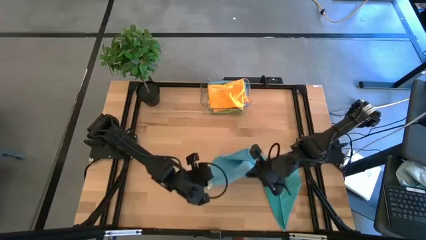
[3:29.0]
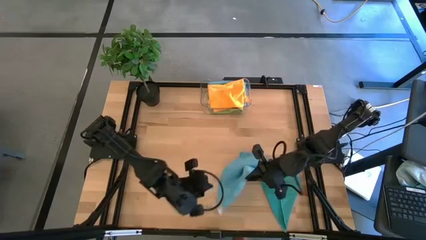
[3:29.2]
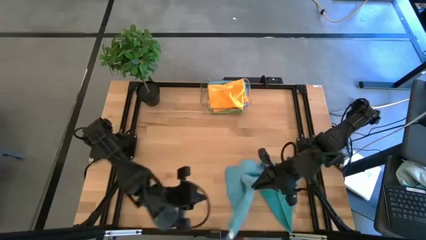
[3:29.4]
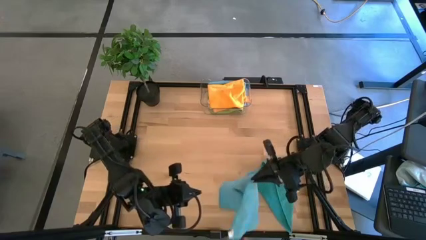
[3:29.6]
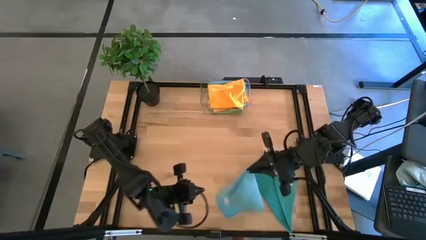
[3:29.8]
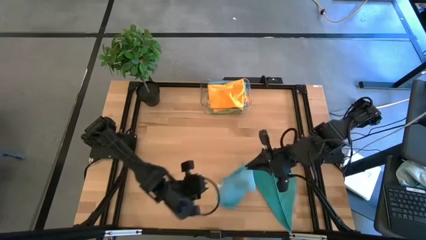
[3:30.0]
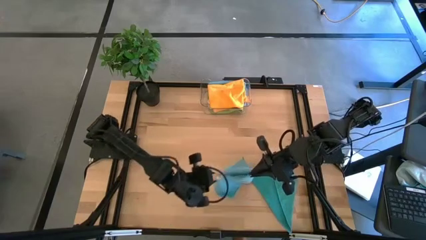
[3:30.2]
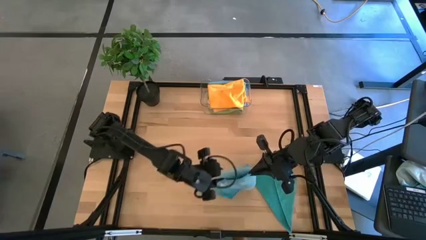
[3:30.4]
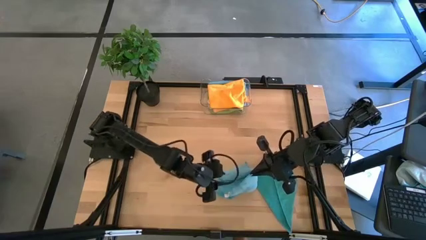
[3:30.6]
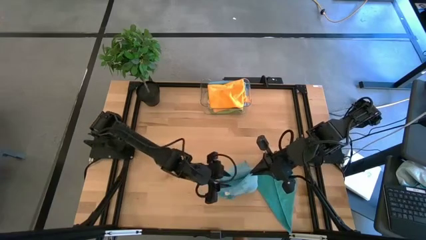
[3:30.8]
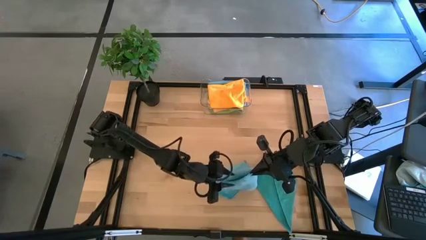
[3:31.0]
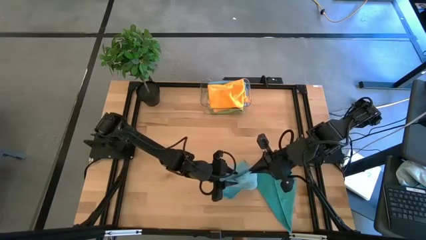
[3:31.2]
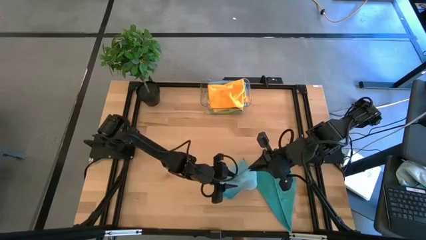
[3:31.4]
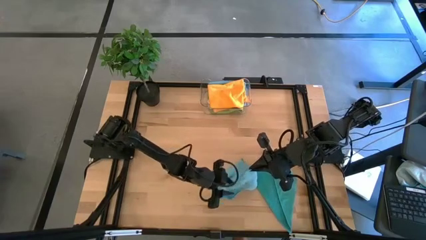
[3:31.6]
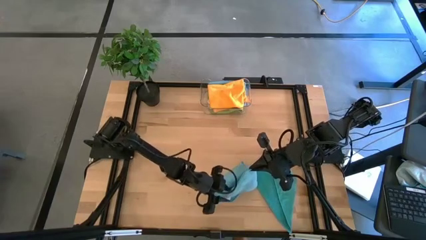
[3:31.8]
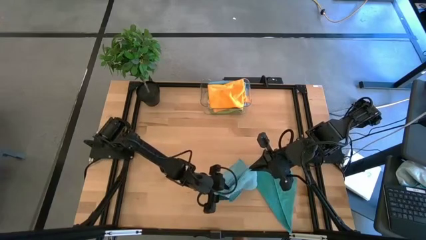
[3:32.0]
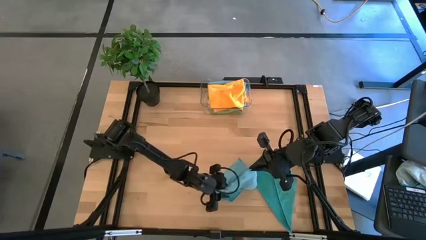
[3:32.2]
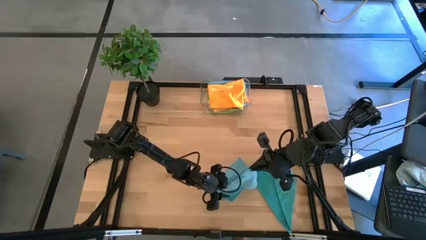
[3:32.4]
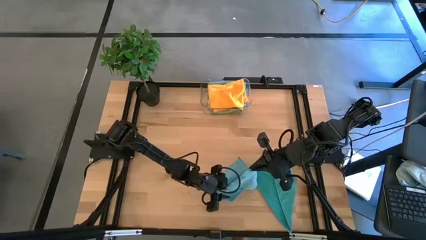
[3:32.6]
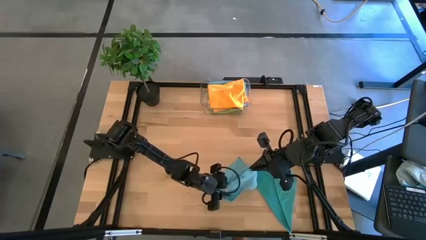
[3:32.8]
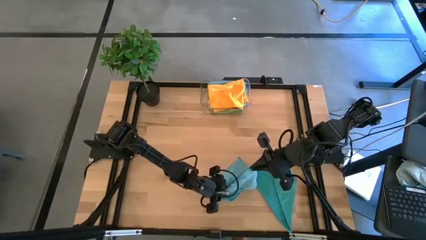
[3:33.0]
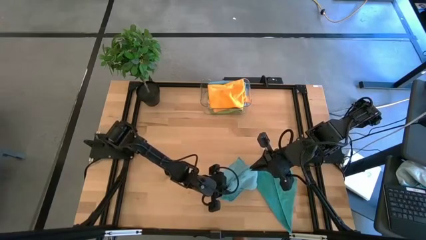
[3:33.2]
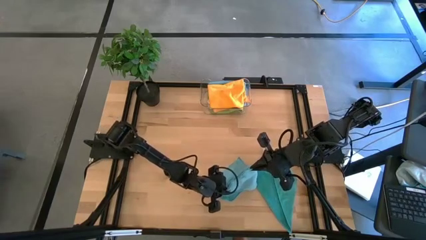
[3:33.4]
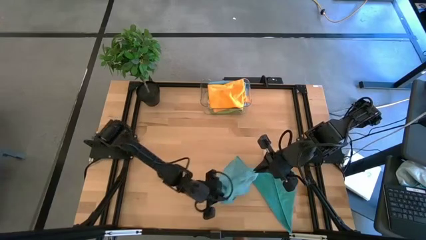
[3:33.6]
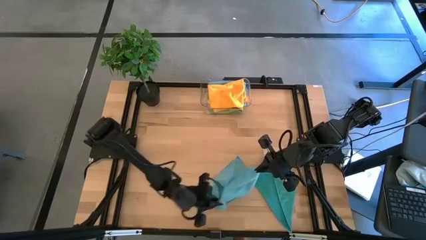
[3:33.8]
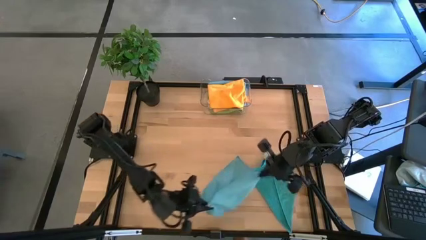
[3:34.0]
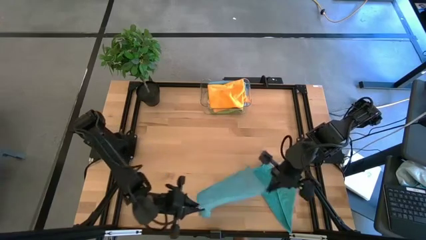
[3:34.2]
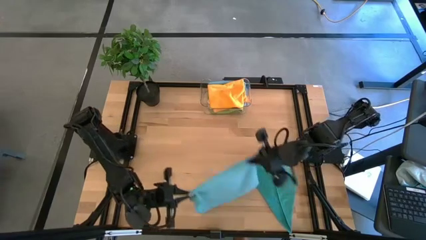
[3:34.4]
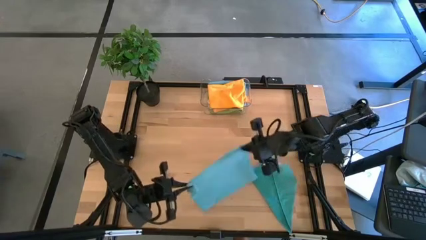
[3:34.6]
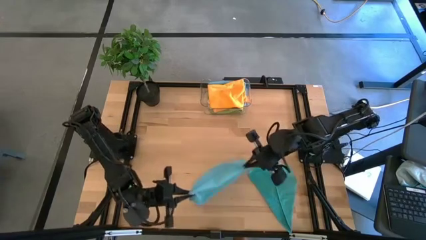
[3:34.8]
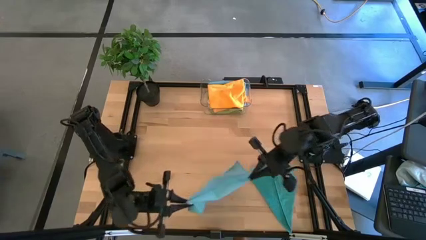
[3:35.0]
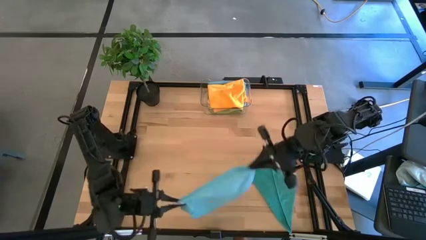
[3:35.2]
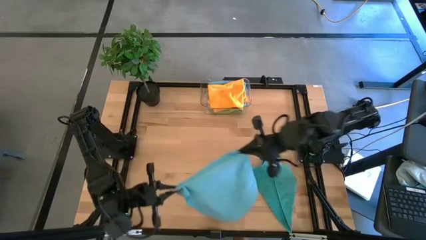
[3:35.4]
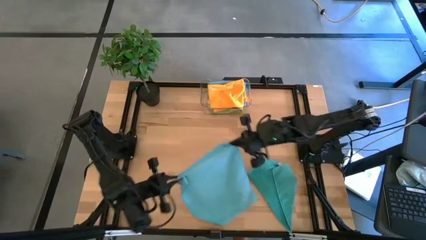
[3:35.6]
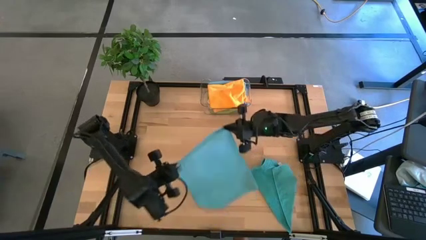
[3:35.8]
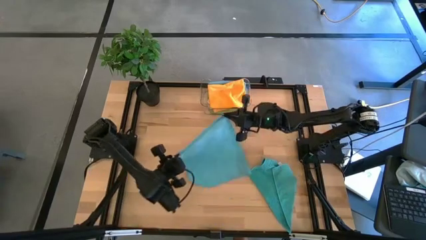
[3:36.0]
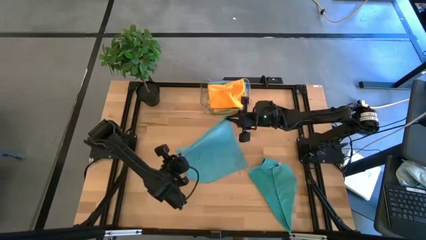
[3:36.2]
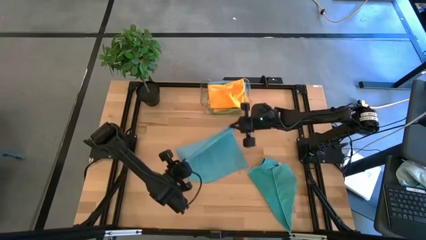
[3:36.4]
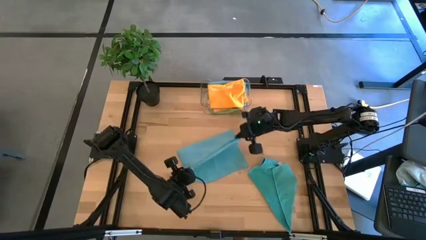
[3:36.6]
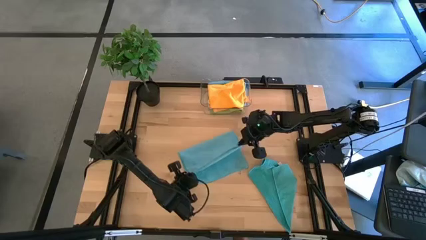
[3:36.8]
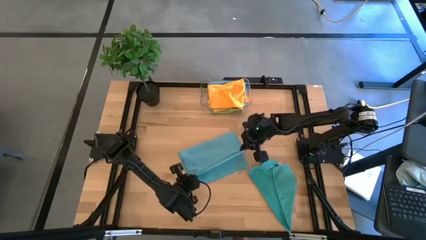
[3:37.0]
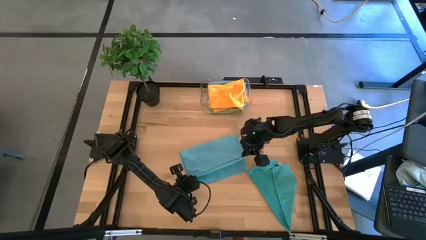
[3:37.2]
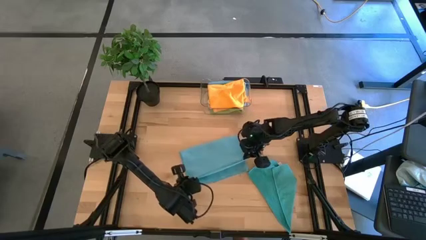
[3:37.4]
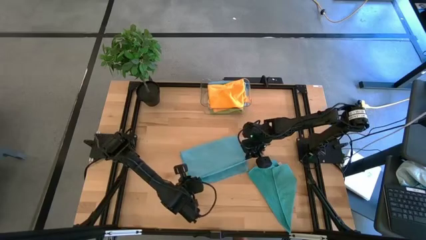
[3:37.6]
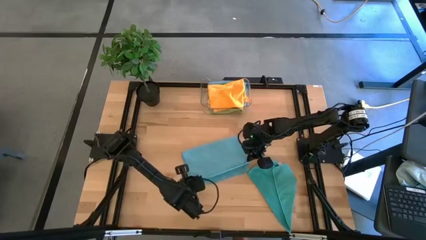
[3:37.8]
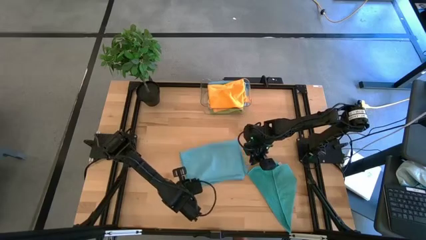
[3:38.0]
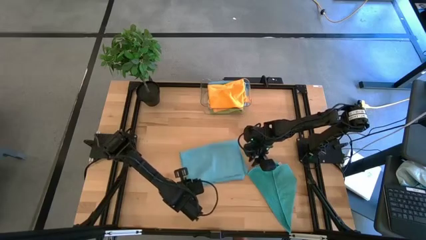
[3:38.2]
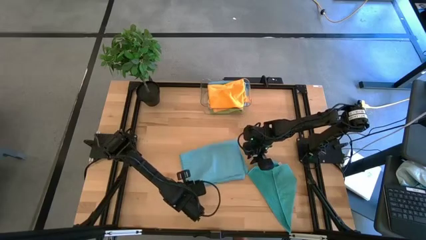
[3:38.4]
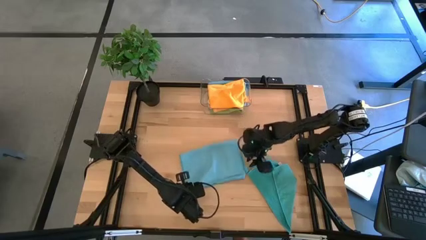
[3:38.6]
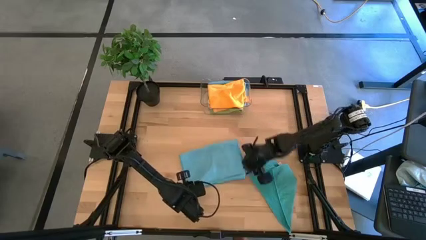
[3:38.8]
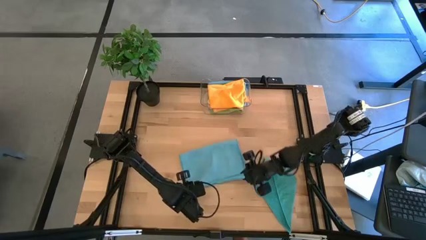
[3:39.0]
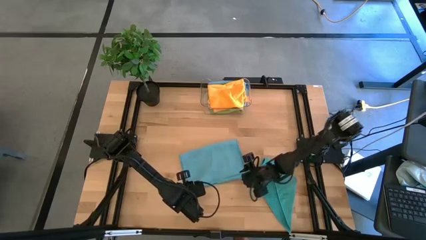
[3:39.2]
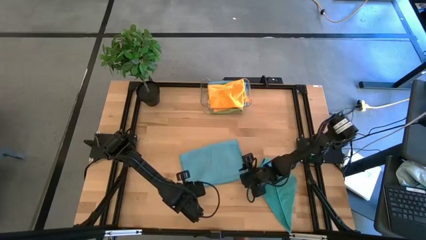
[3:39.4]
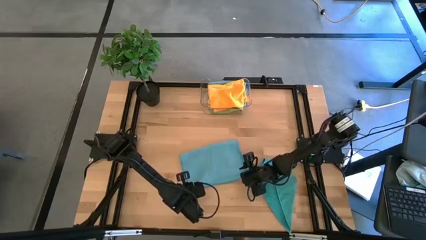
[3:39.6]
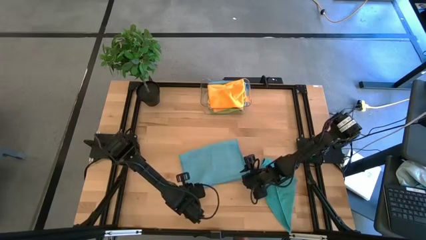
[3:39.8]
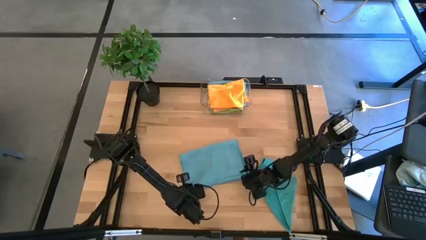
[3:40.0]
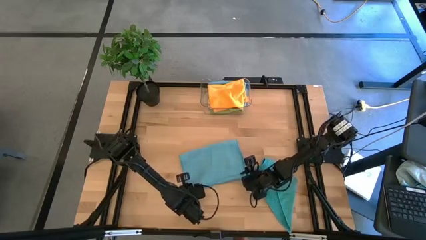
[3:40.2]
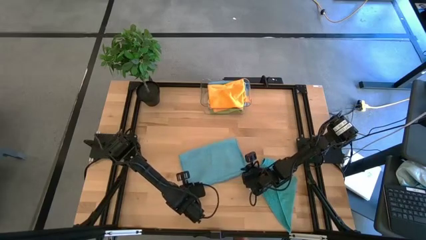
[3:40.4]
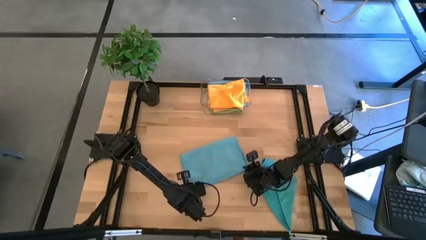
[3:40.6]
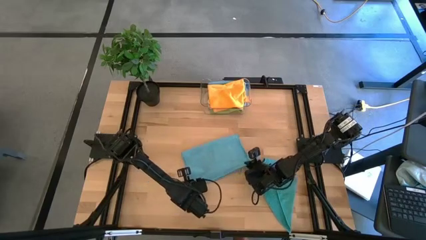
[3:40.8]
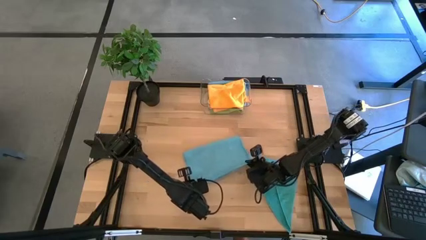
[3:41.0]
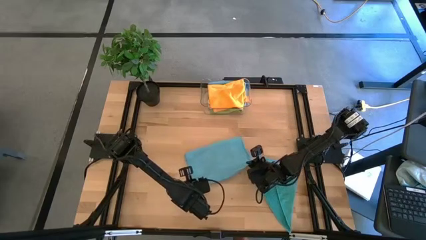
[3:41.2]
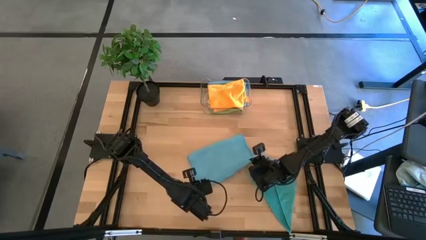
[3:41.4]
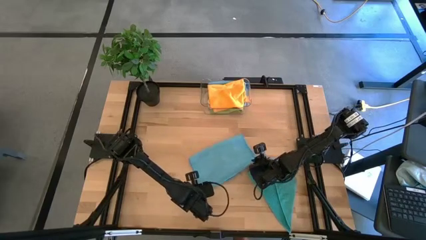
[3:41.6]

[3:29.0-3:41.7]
Task: Fold microfiber towels
Fold the top blue microfiber towel
